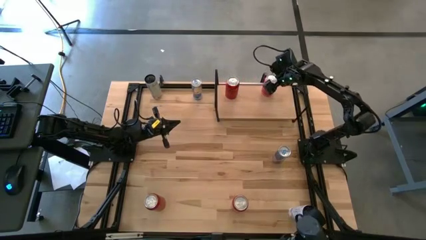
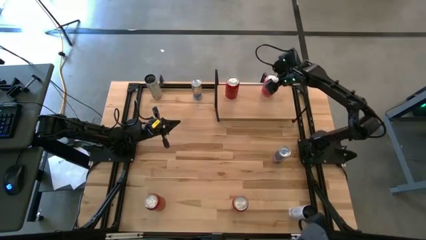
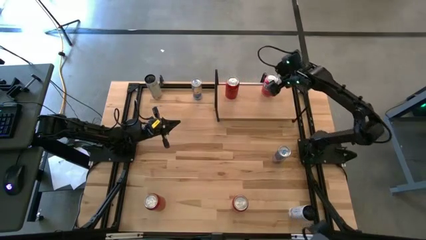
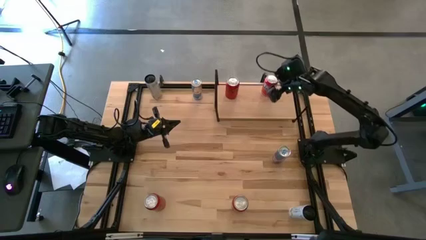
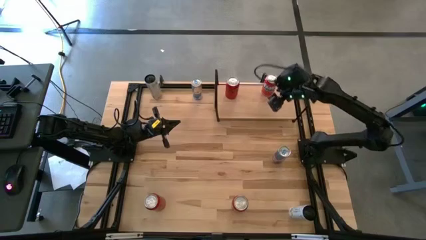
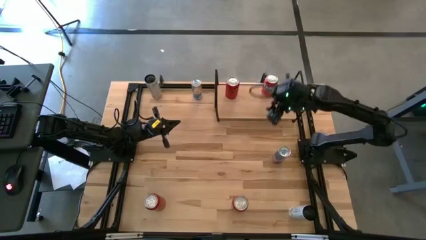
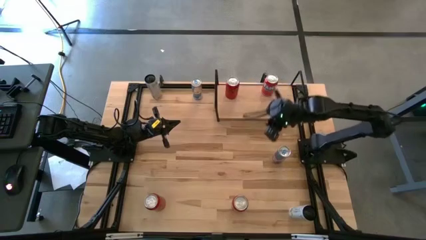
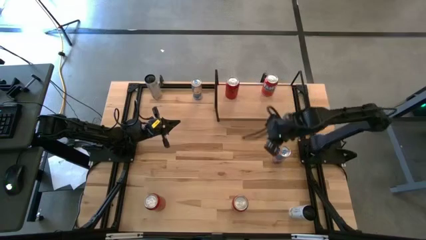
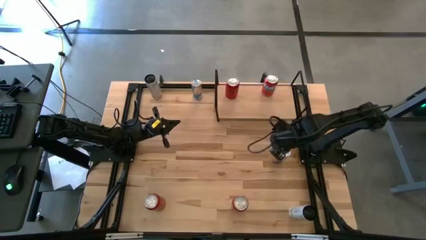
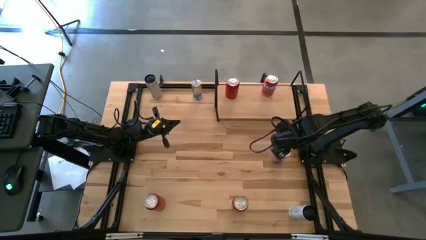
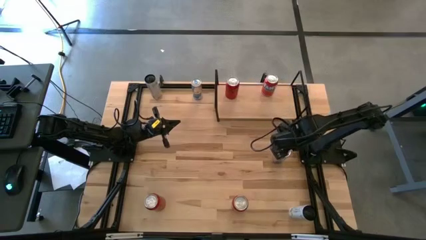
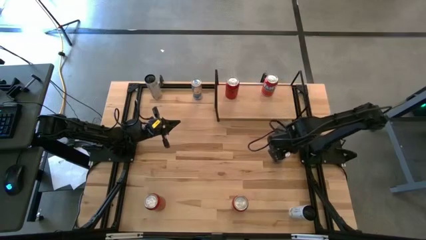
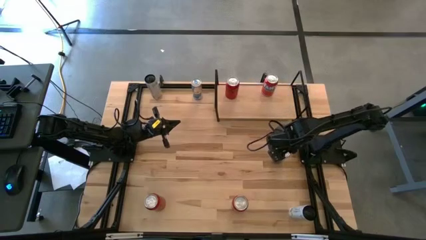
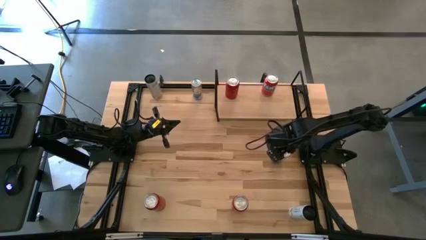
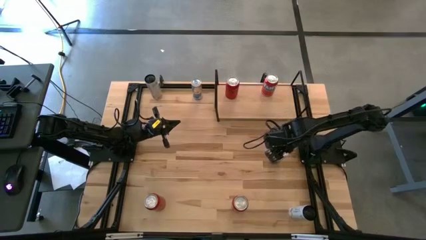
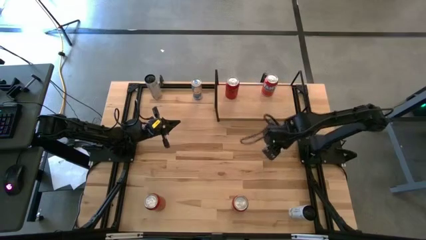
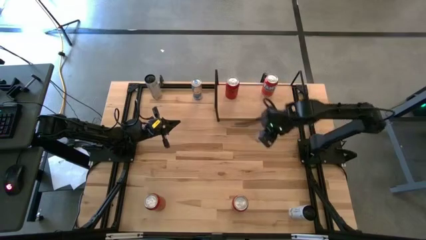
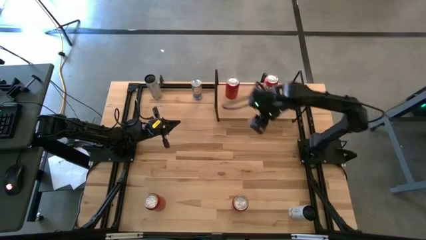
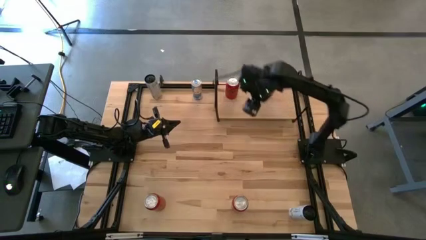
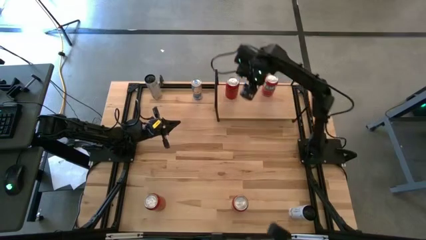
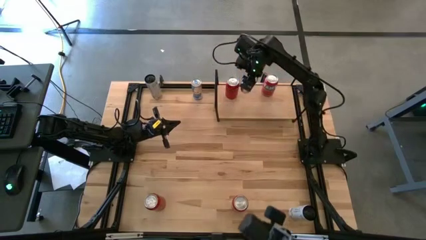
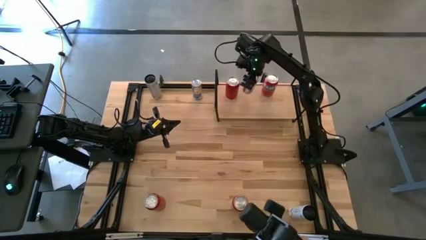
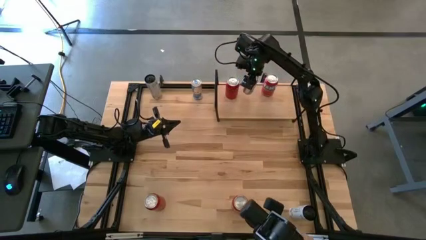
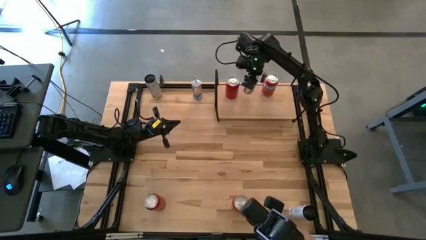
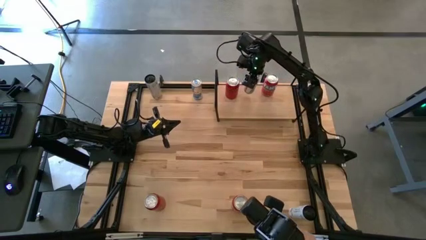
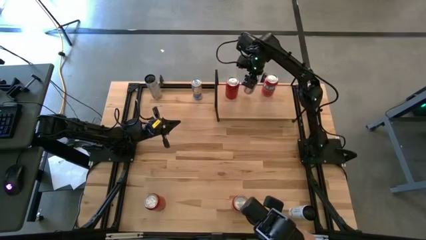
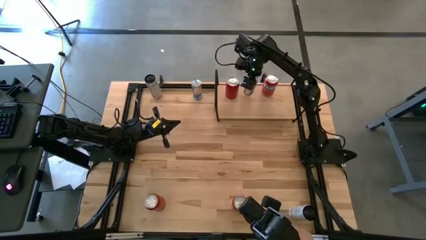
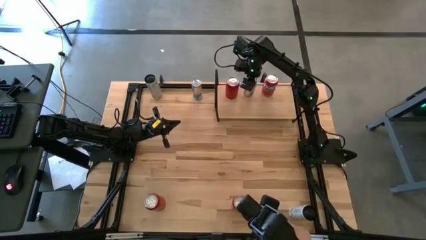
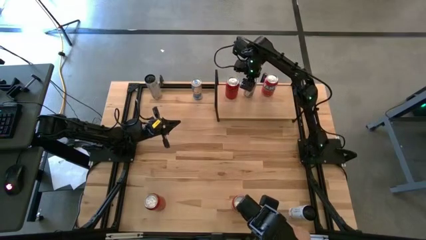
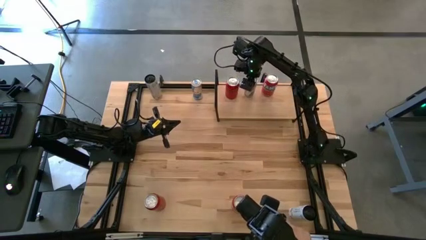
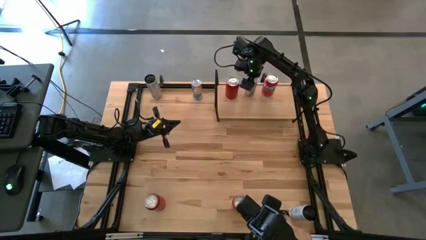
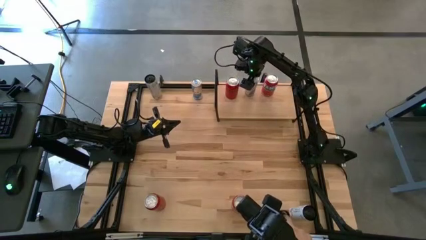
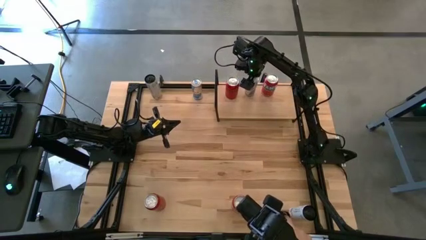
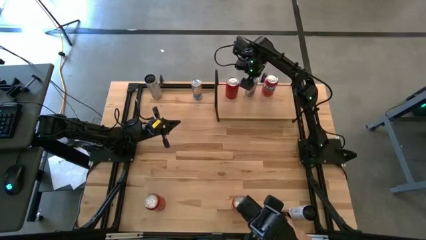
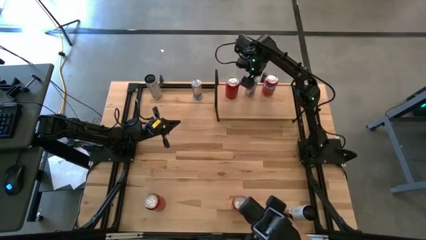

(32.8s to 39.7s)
Task: Place canned beverage on shelf
Put the right blue soda can on the shelf

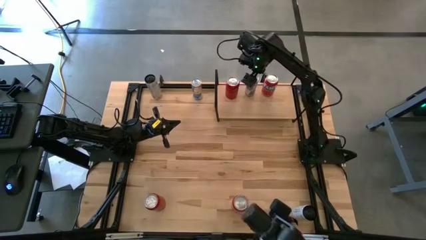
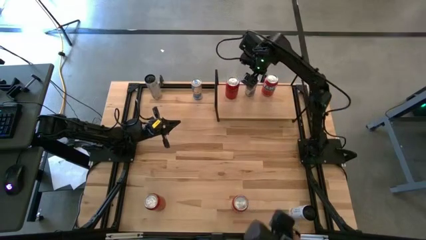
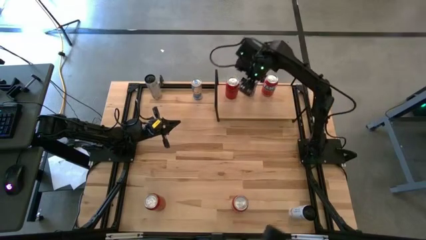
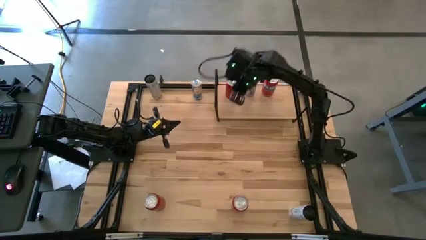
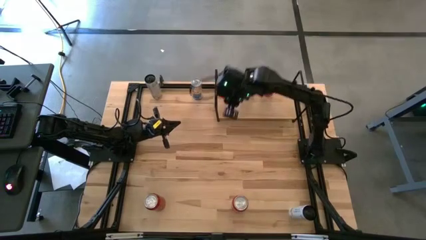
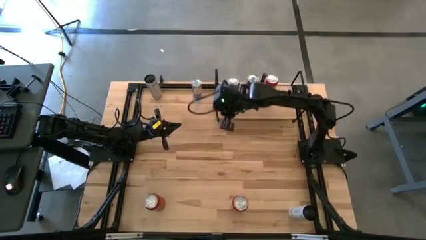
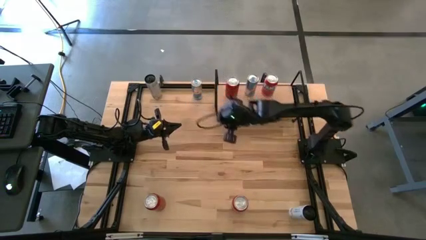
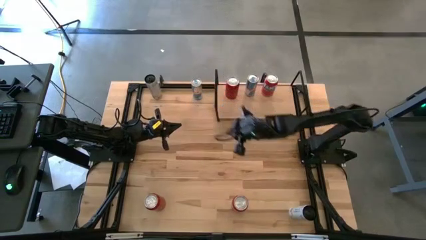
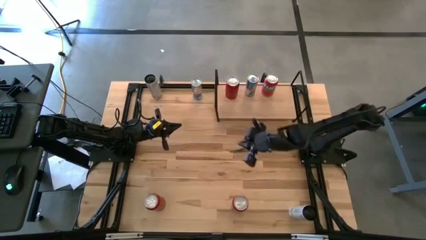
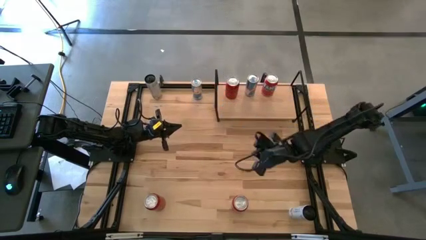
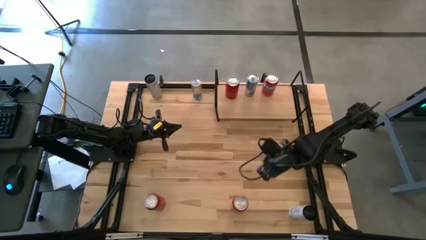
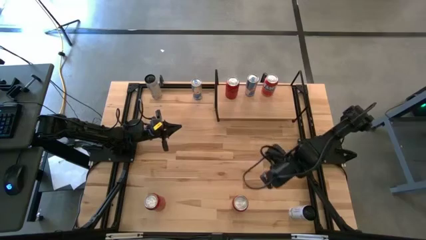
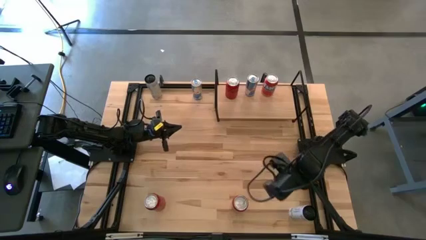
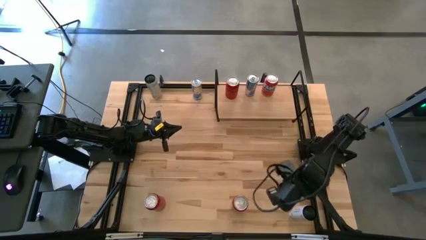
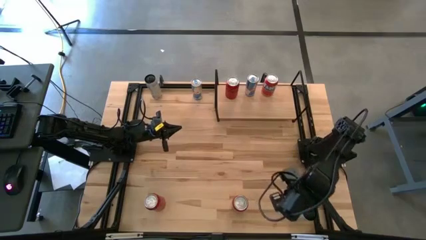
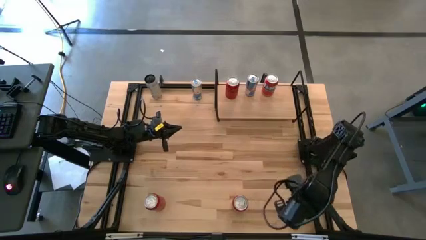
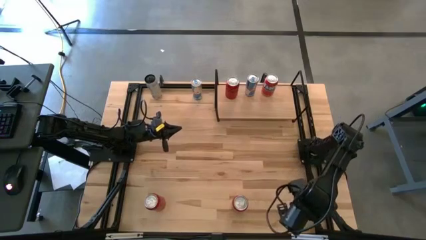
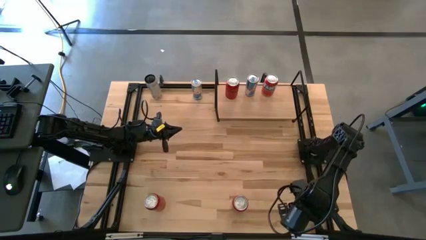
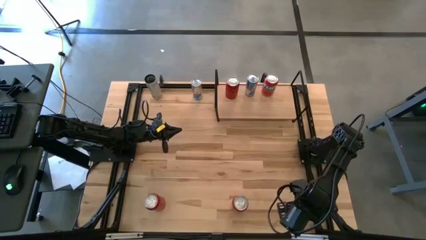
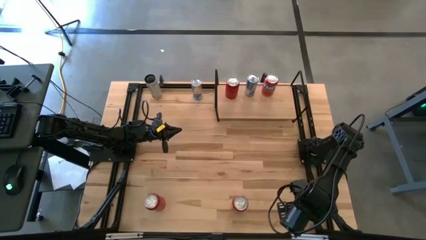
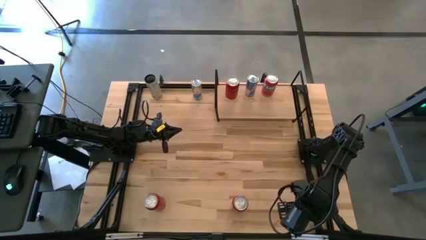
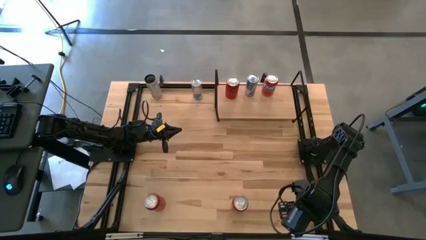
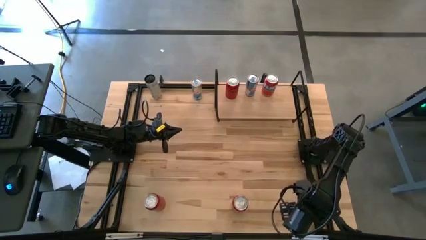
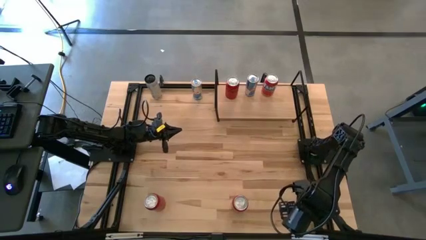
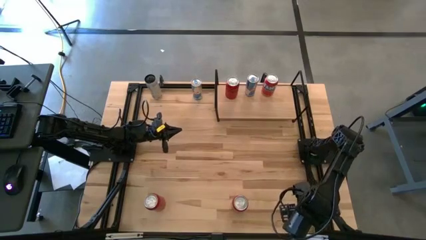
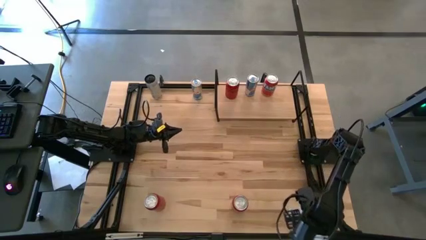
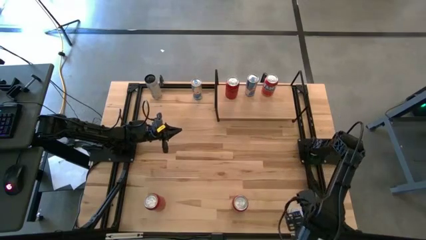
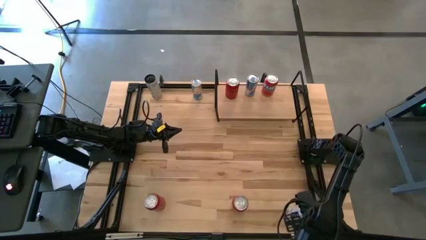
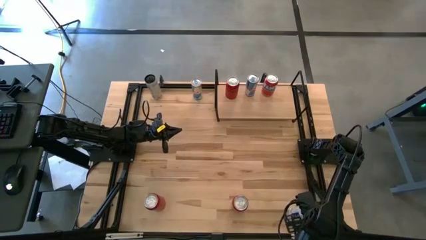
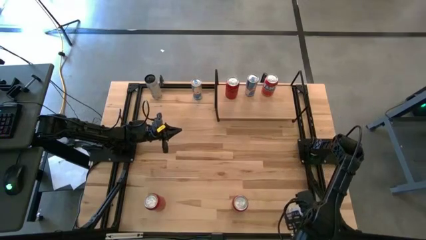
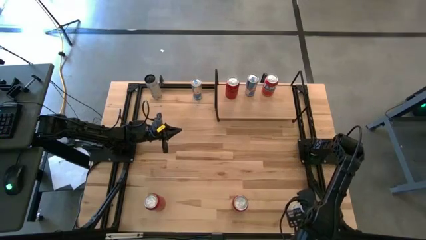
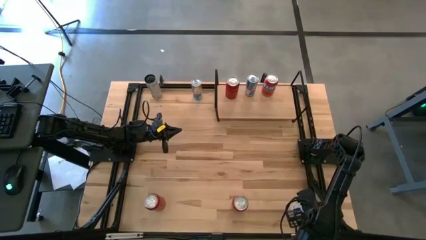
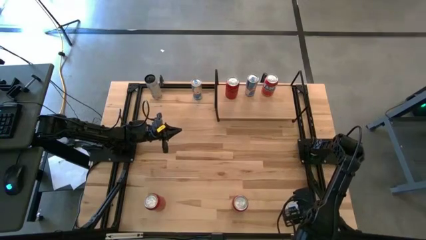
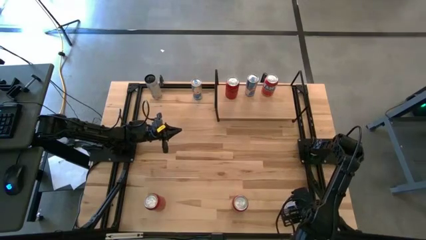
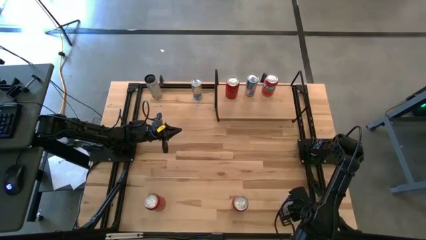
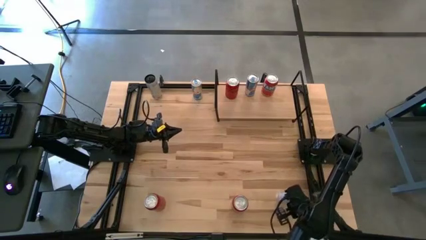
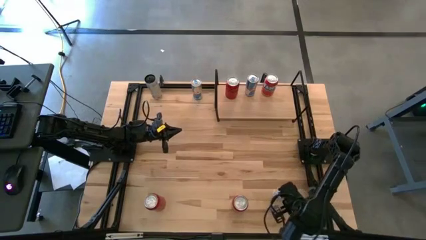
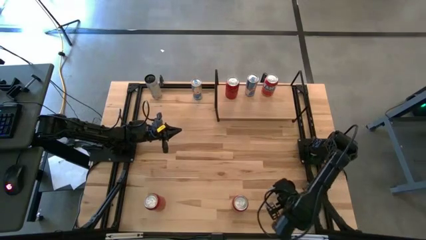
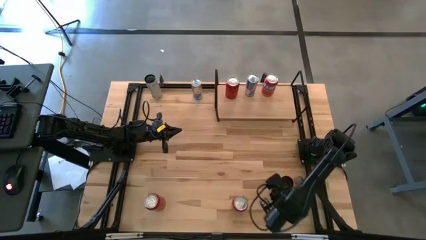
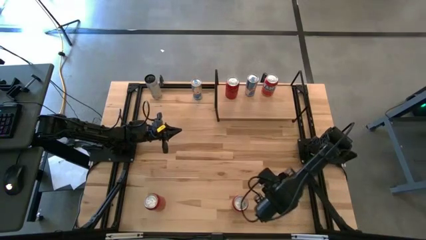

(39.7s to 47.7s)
Put the bottom white-yellow soda can on the shelf
